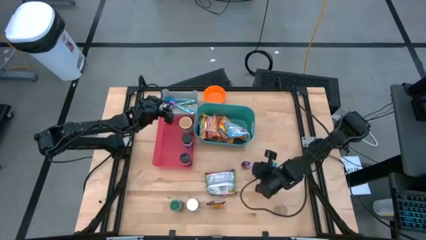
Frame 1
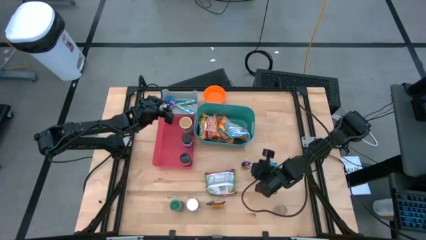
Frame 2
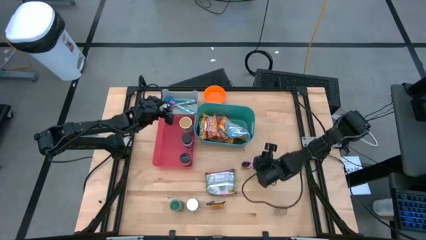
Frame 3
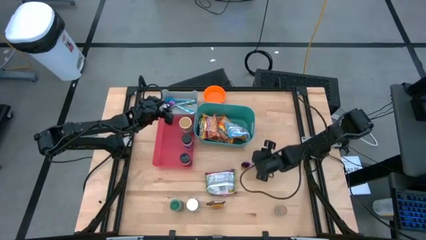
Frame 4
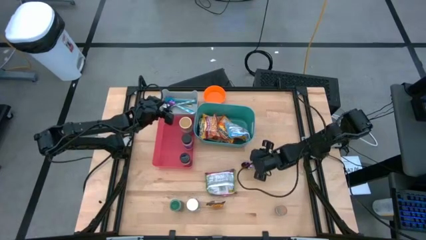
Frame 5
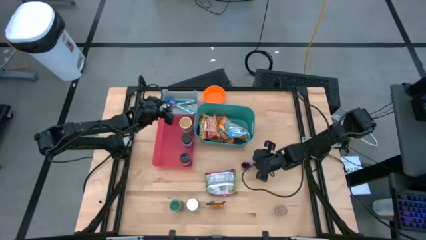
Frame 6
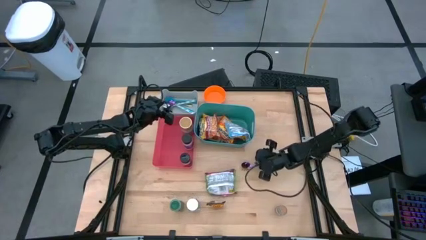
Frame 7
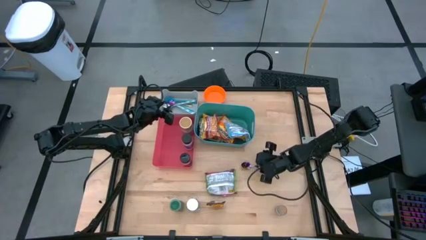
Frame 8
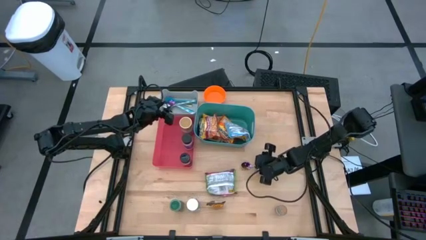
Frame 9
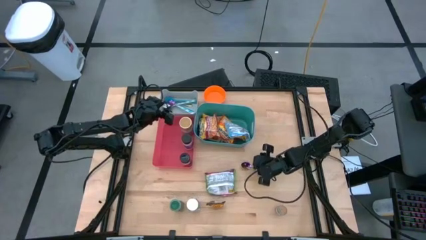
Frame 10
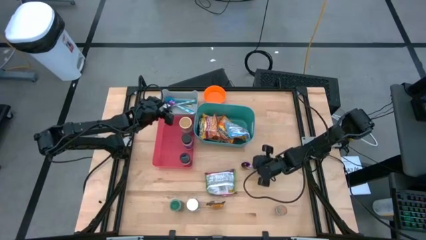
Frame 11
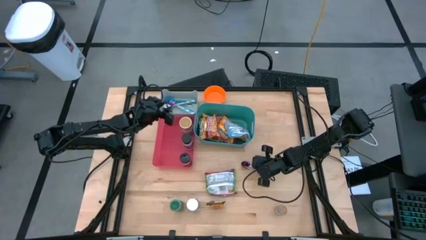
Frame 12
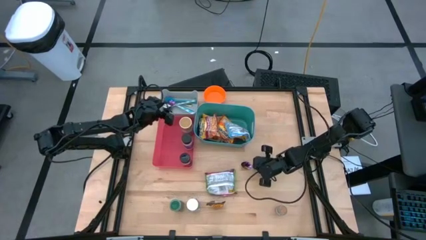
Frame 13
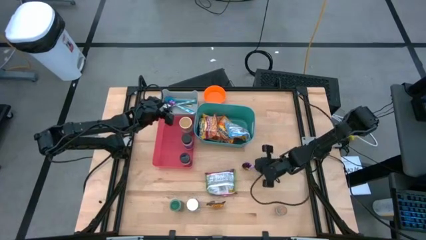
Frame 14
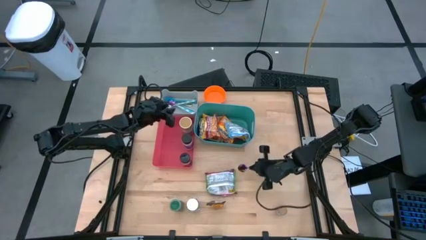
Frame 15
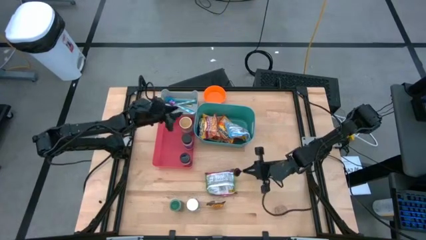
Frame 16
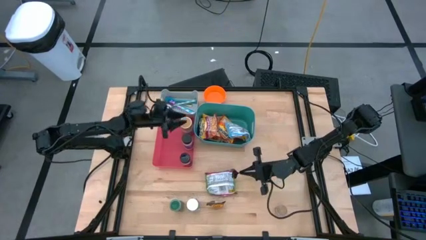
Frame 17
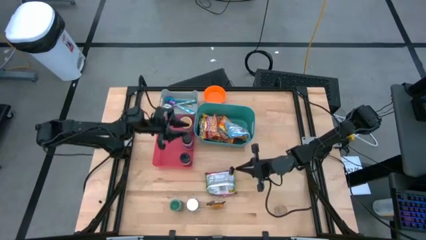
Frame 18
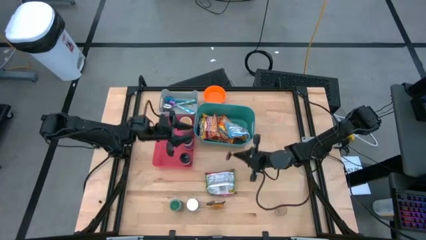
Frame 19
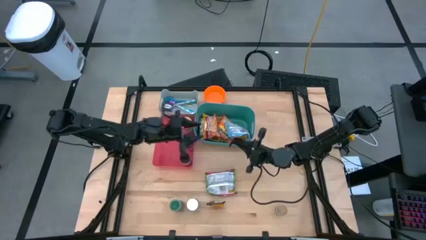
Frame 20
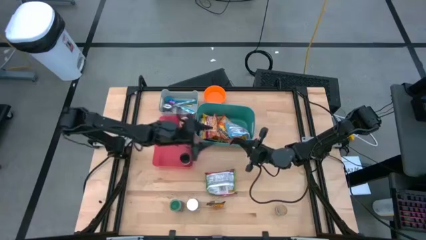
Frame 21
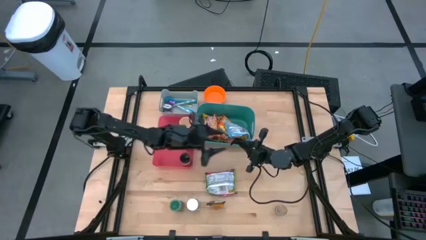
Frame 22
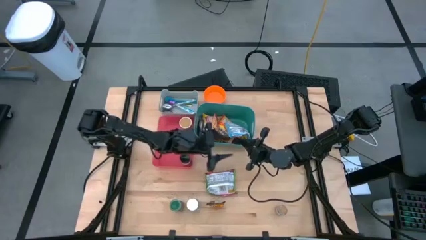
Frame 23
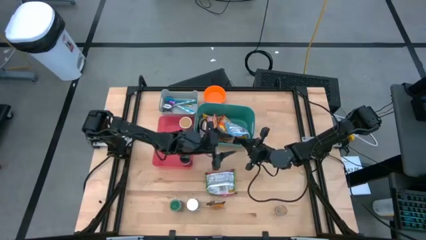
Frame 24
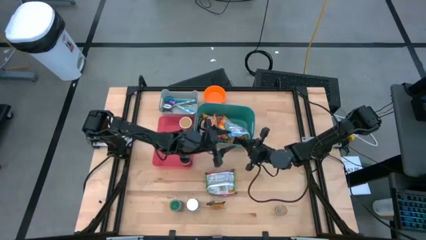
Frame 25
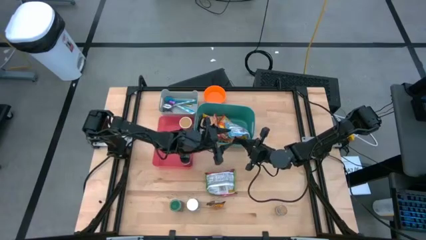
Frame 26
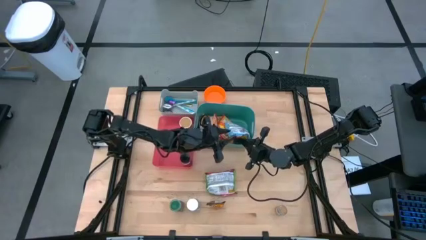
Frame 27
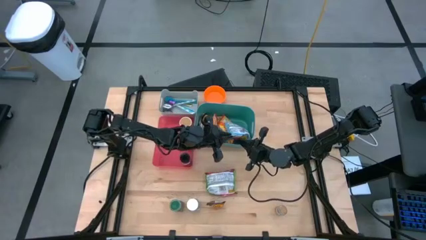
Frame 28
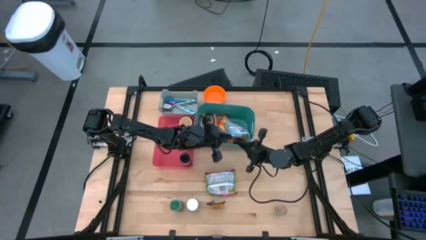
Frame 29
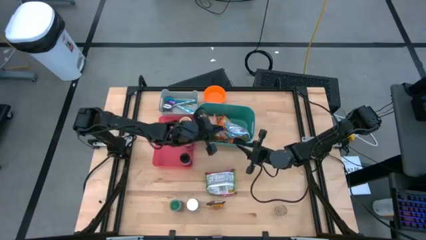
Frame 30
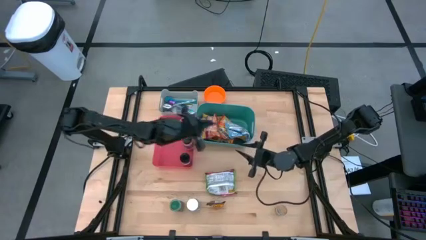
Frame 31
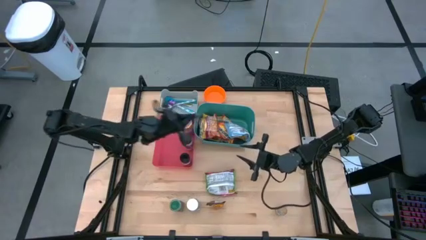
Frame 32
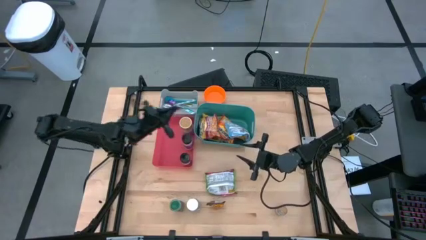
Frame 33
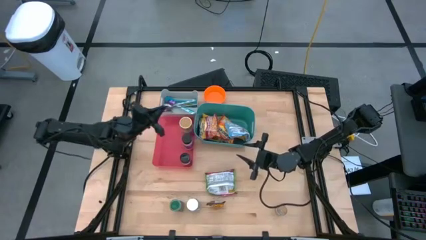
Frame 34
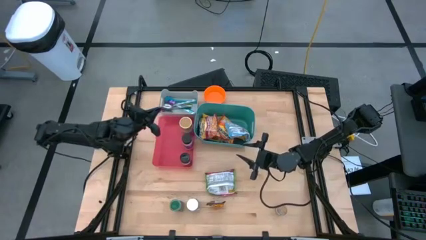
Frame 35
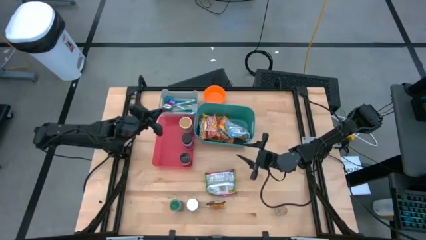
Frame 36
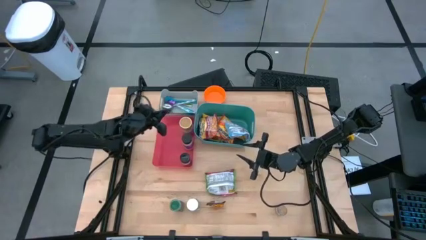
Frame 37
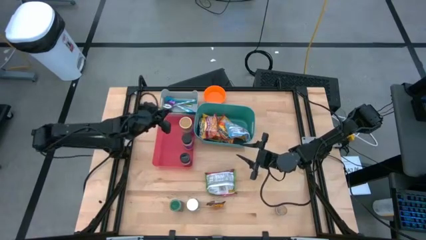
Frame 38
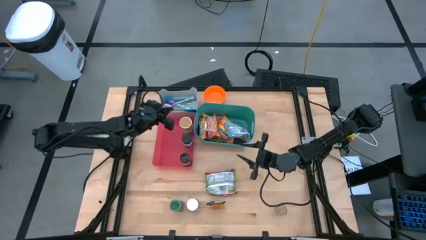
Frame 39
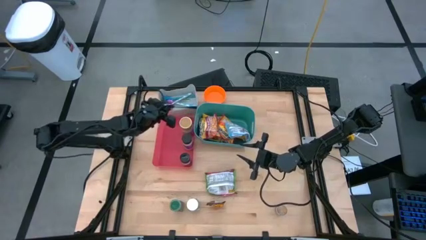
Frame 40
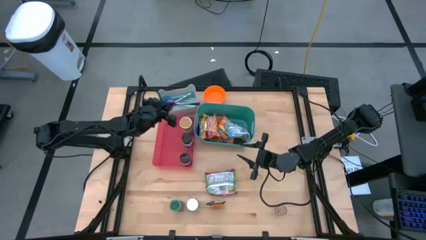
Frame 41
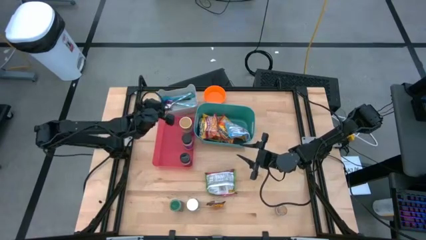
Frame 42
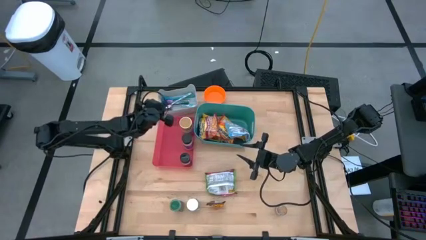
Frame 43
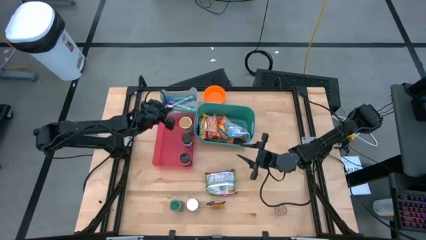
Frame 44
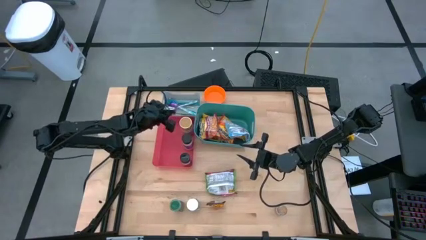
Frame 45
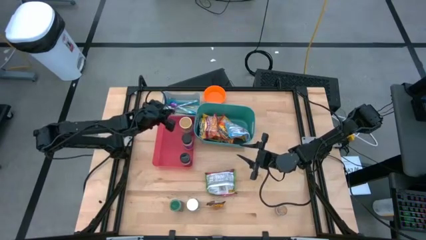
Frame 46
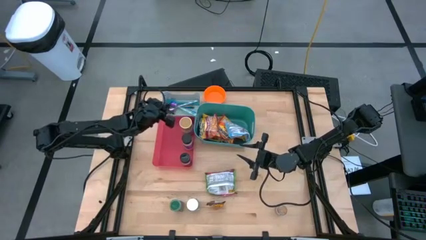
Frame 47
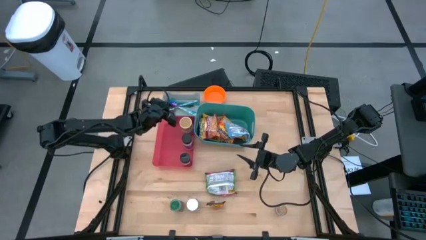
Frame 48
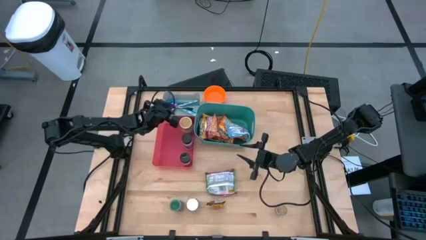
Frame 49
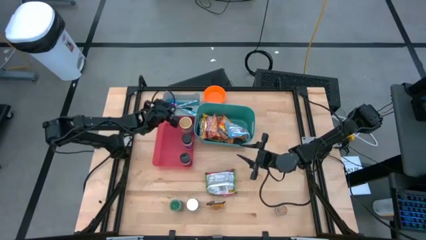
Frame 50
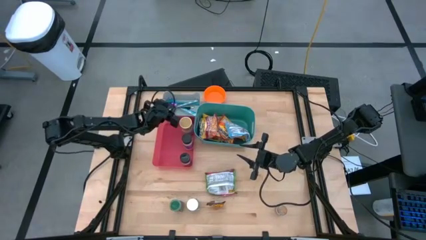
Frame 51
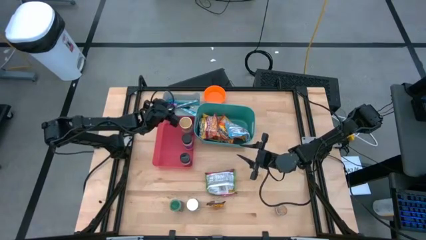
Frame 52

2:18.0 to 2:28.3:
Task: Pick & Place Food Item
Put the violet spoon into the gray bin

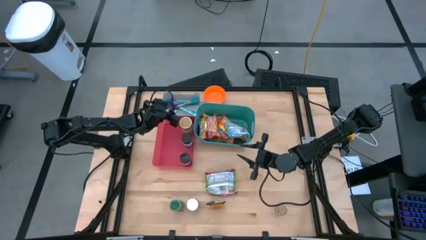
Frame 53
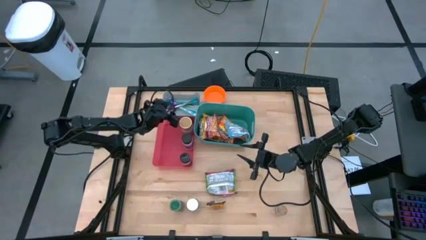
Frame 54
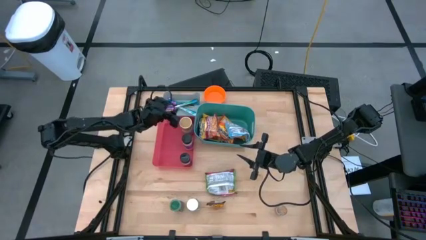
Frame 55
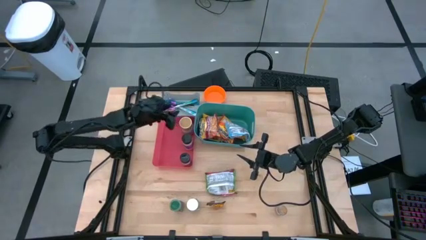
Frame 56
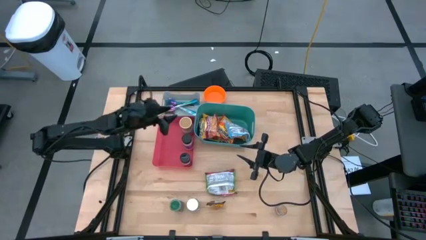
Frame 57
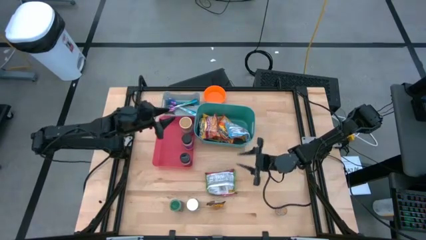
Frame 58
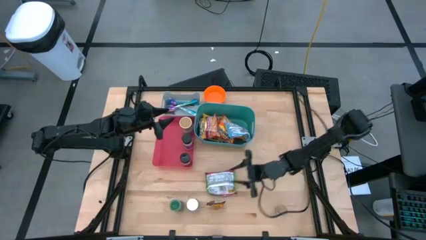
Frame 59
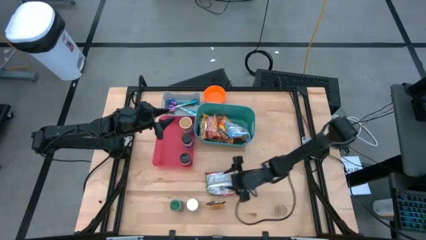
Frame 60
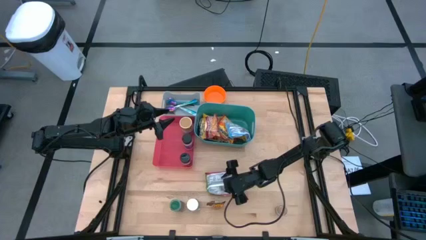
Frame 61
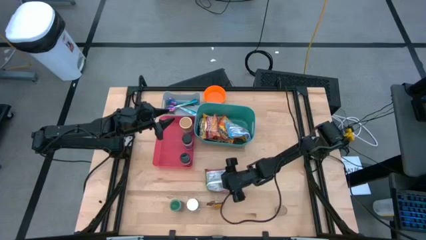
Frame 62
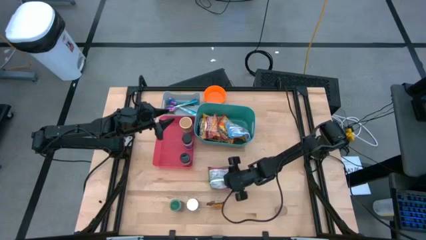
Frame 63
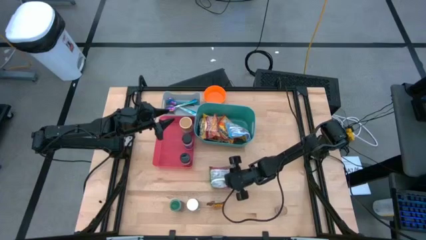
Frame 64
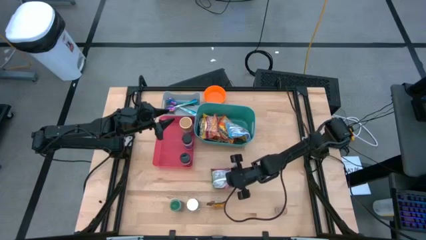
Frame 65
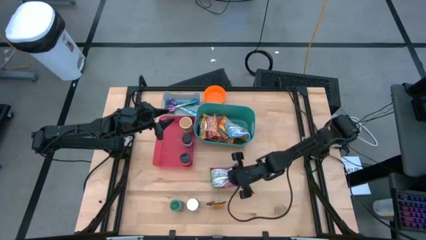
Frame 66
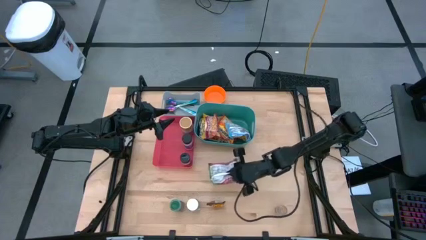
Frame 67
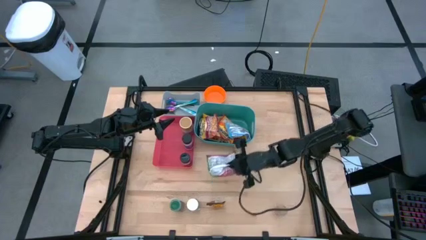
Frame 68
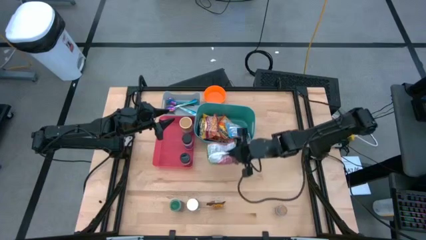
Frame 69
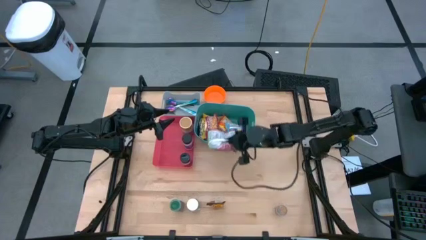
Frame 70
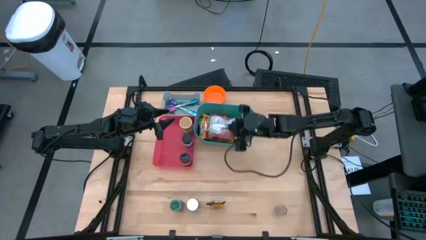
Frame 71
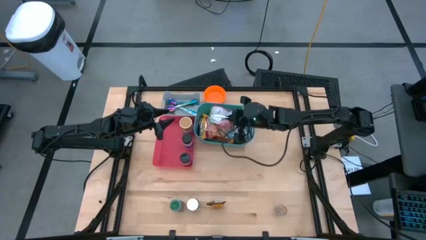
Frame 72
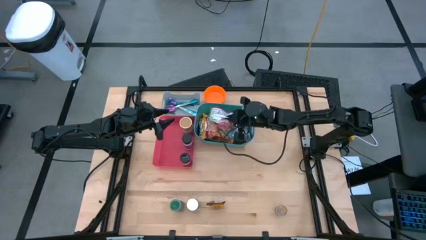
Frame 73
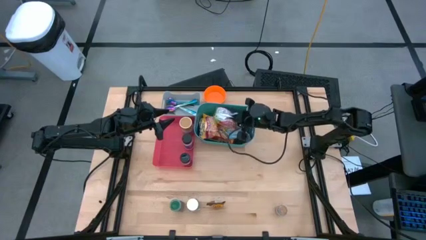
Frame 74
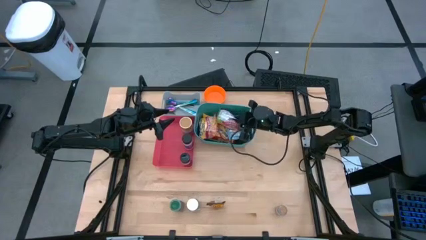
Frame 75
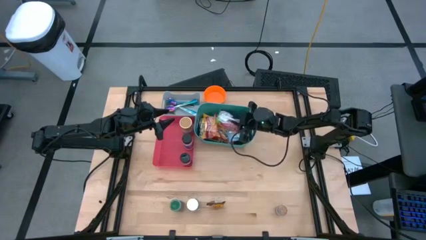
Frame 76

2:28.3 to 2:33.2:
Put the green noodle pack into the green bin

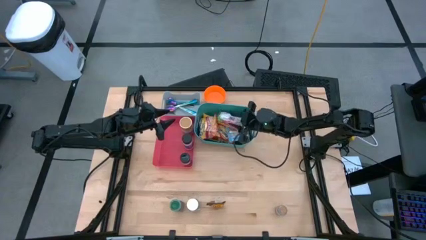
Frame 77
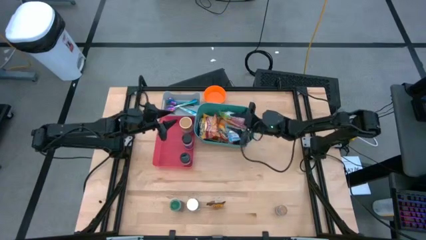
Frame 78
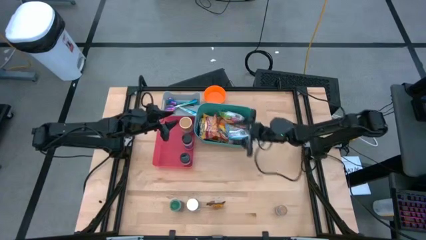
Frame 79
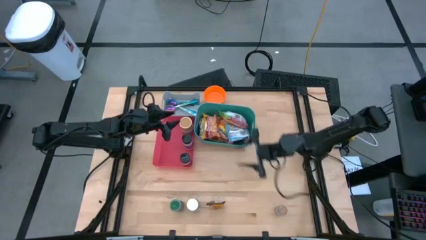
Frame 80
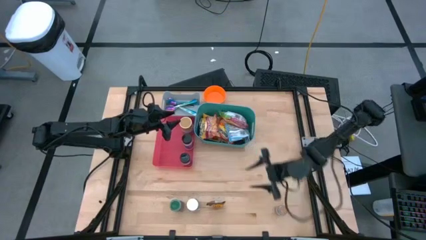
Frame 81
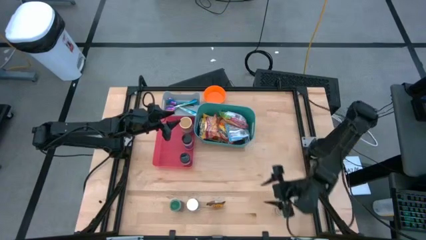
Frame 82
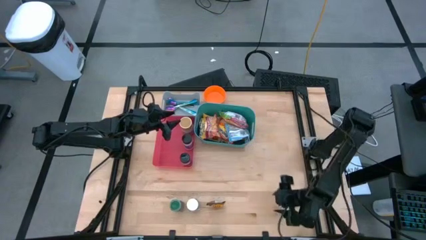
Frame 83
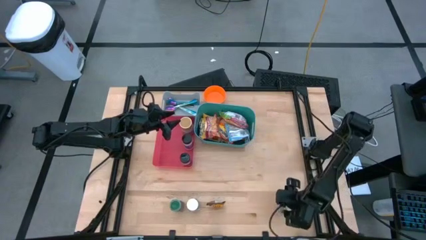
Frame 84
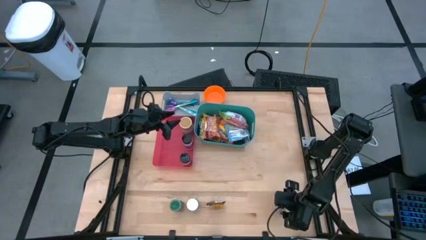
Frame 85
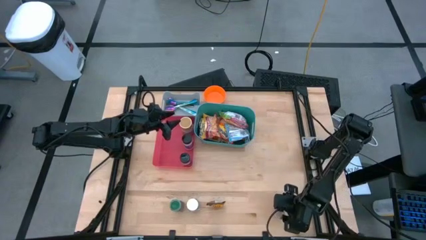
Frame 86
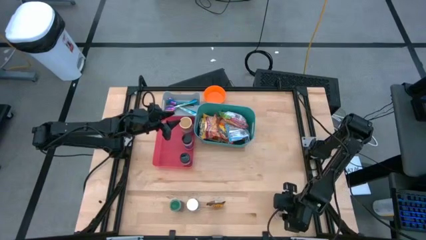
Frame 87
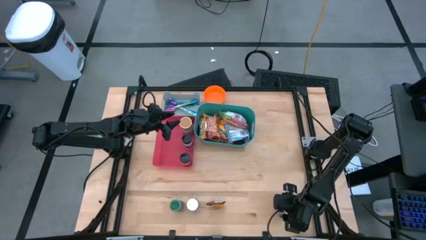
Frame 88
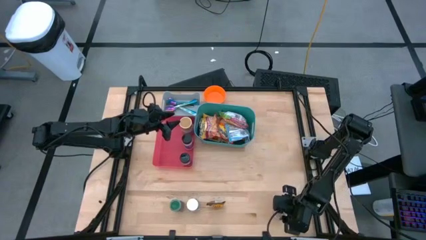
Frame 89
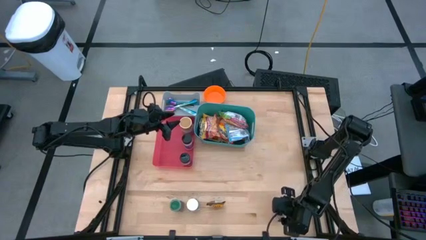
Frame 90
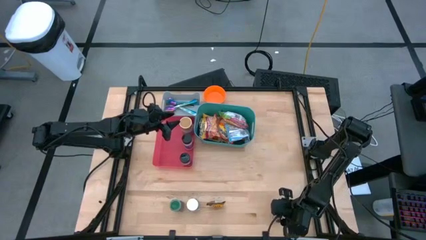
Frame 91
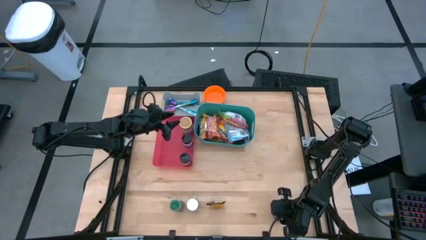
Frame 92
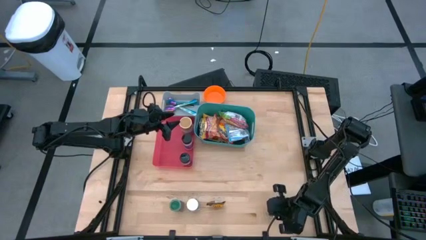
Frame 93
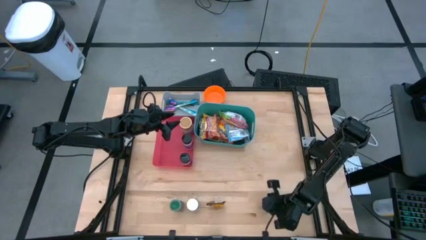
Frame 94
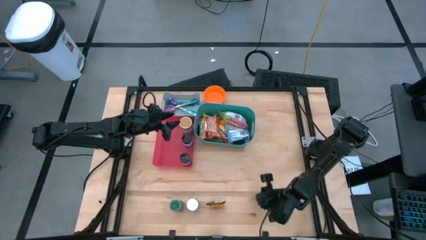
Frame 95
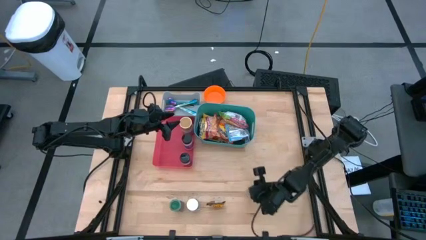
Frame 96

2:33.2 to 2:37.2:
Put the brown spice bottle into the red bin
